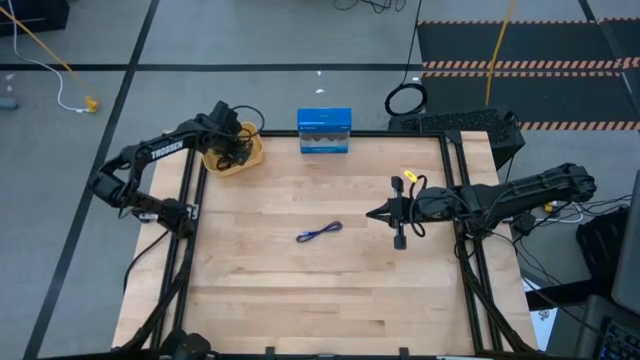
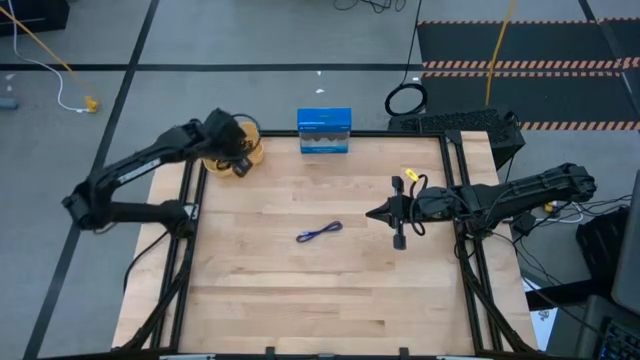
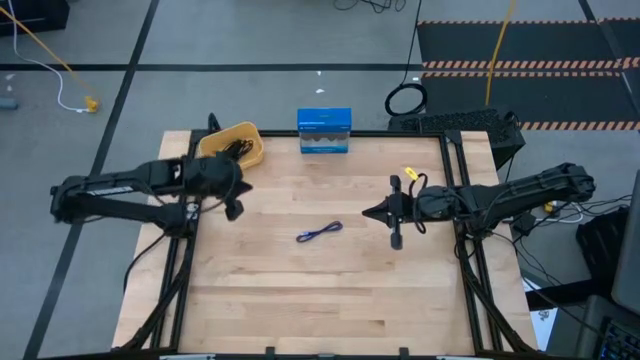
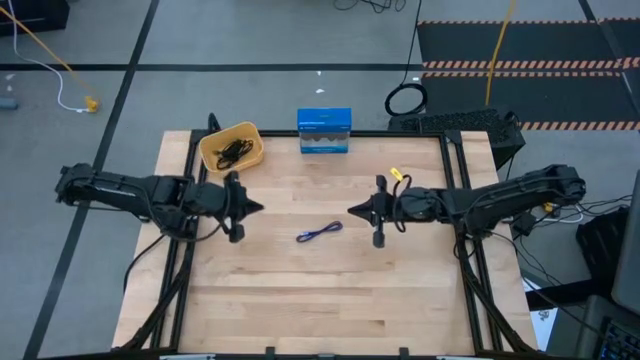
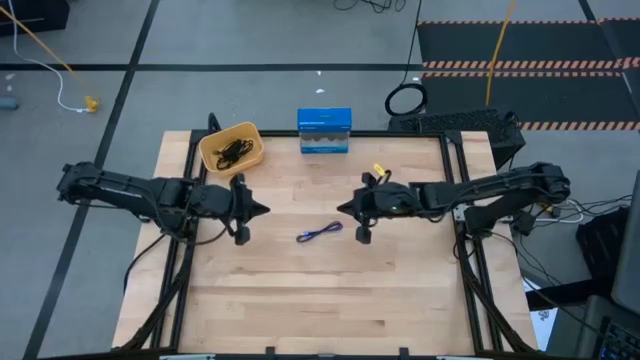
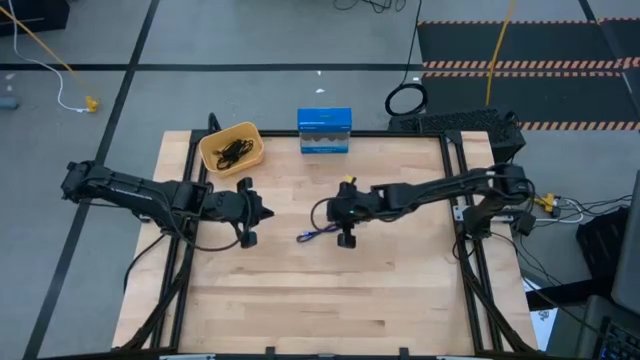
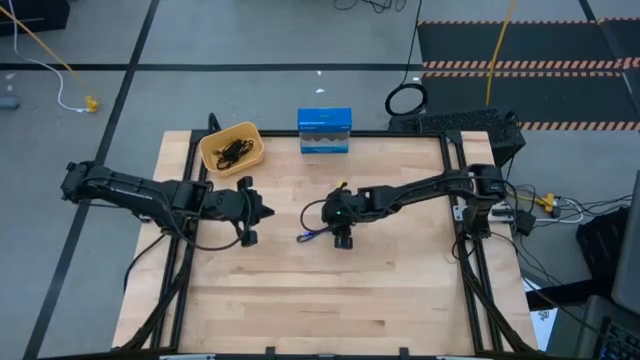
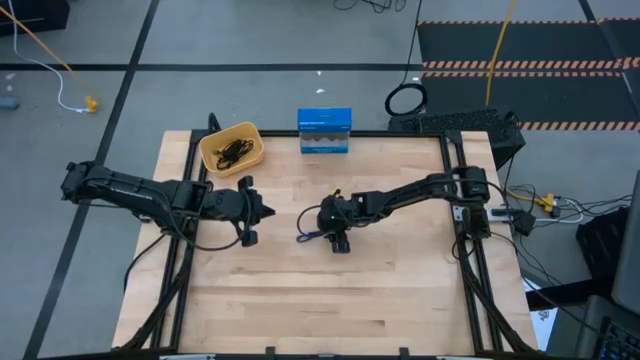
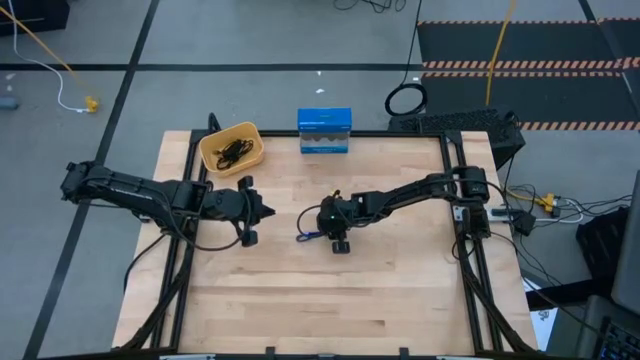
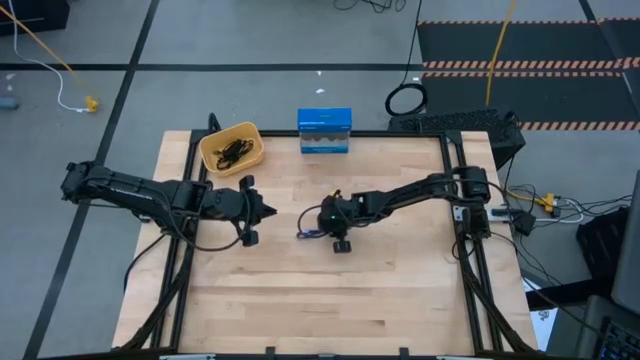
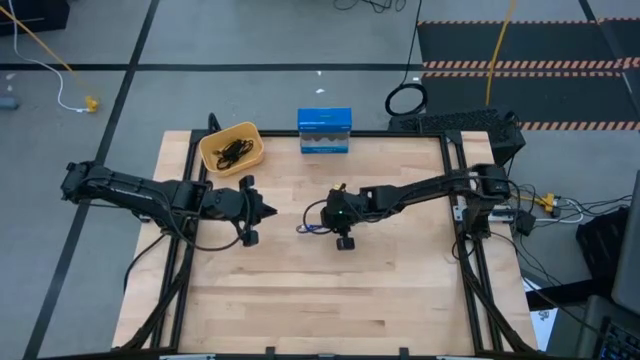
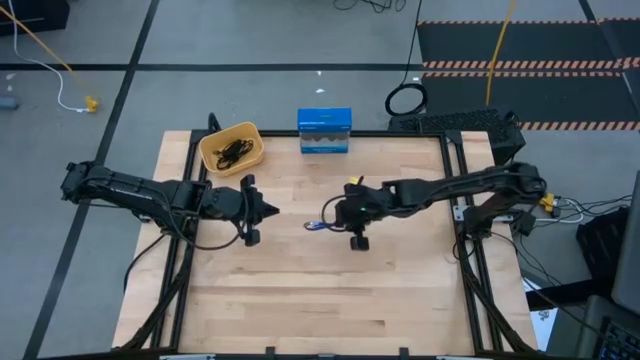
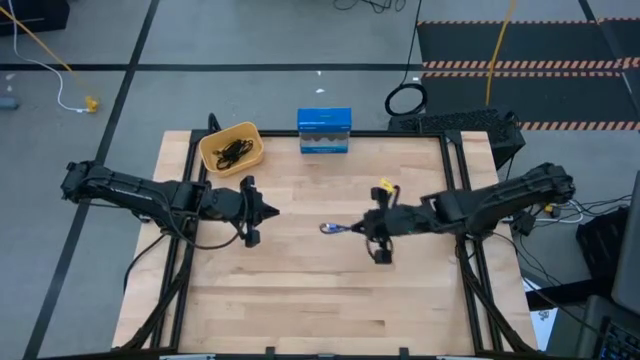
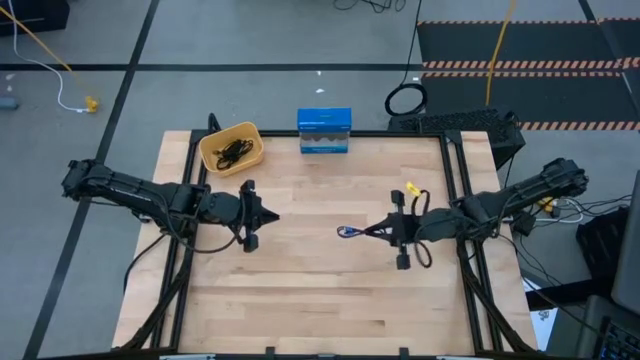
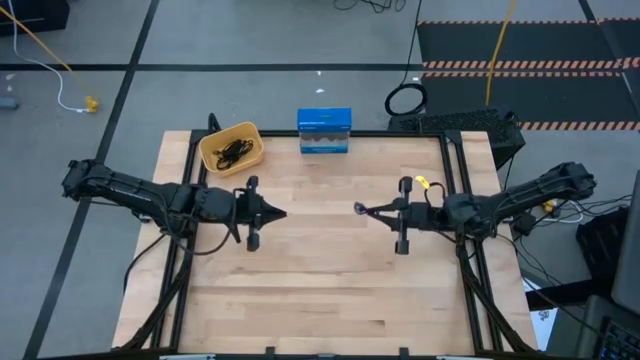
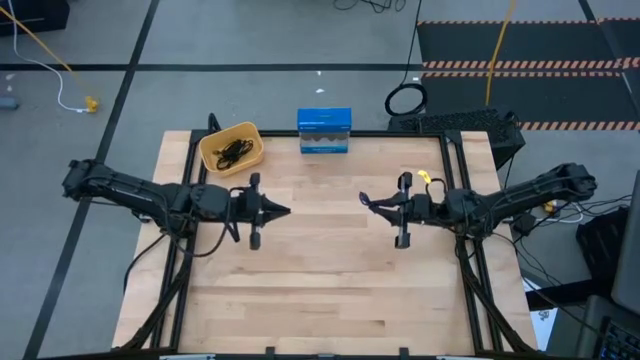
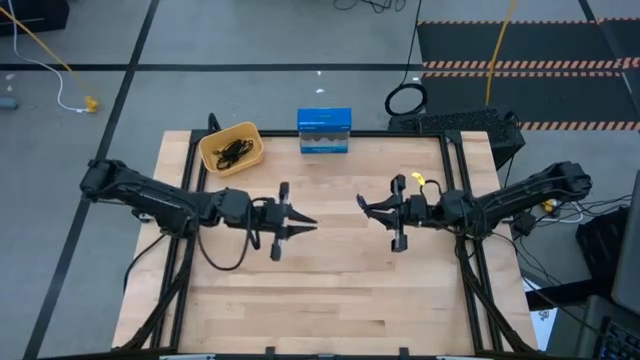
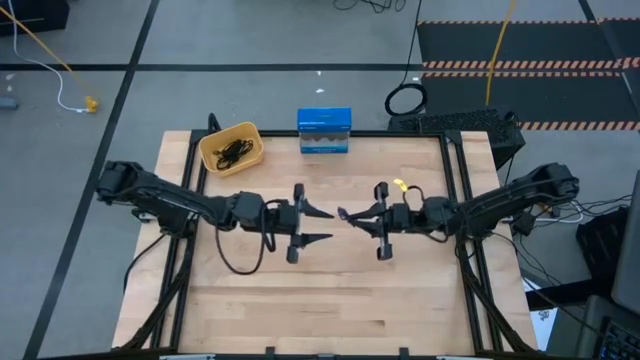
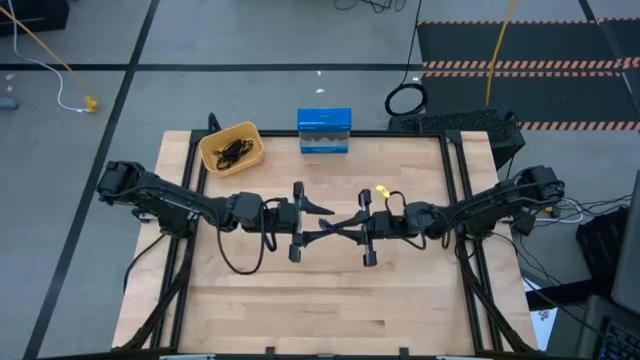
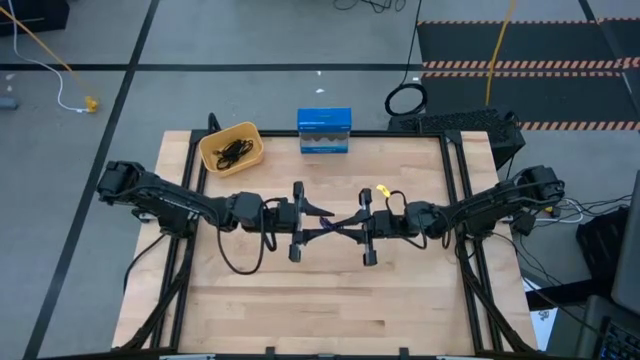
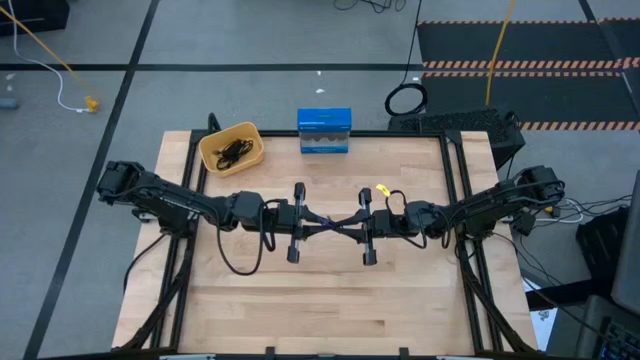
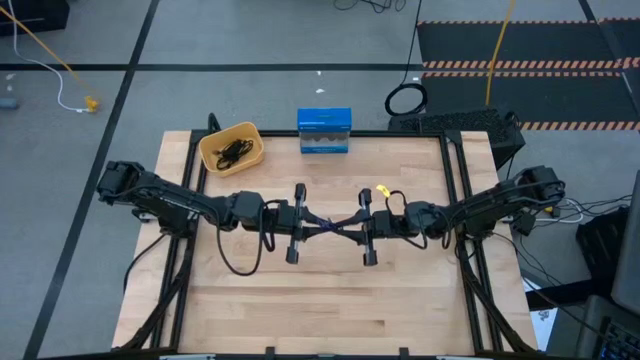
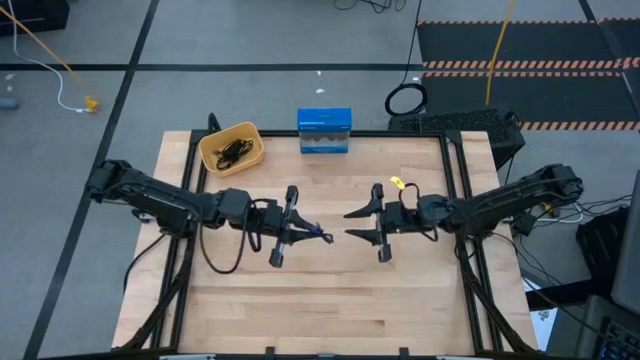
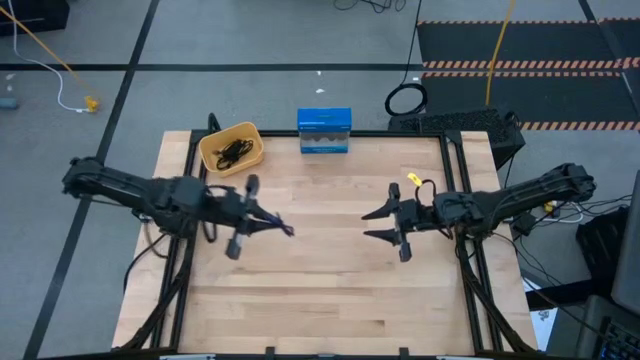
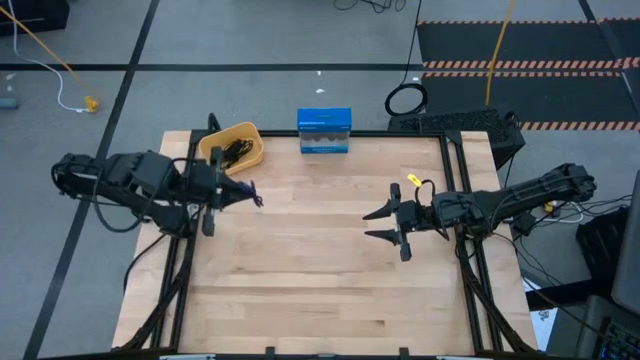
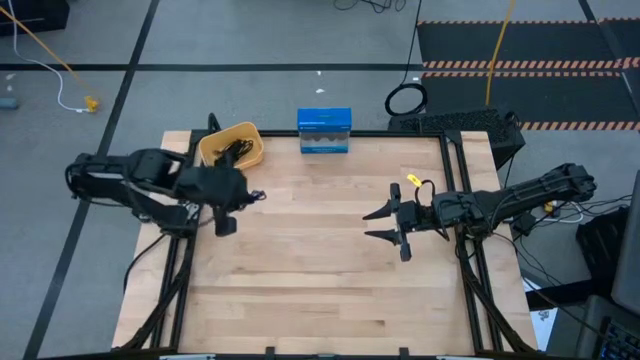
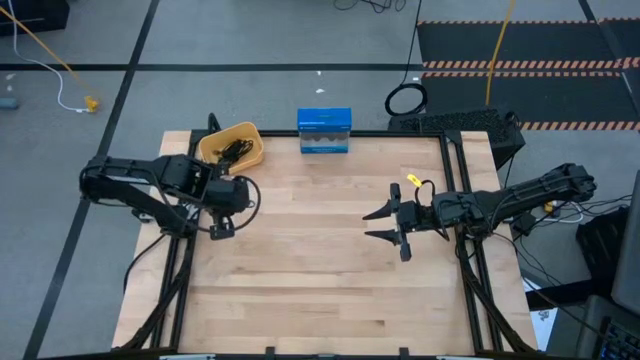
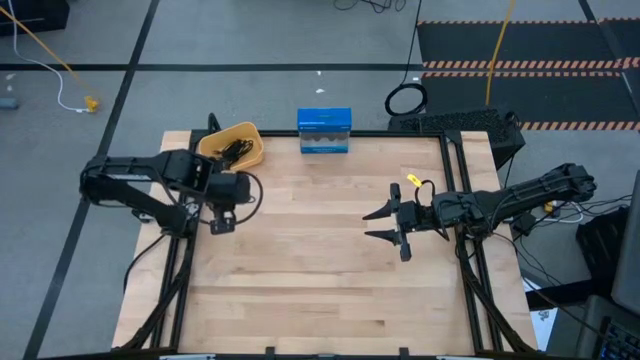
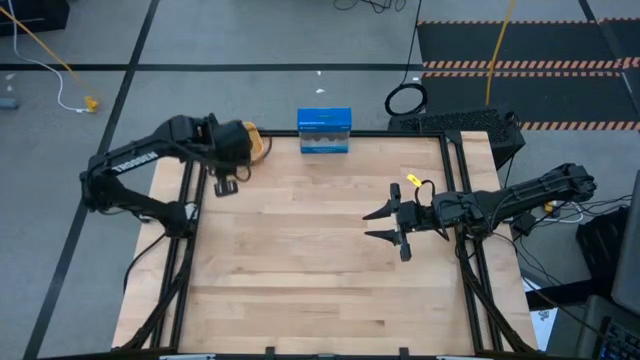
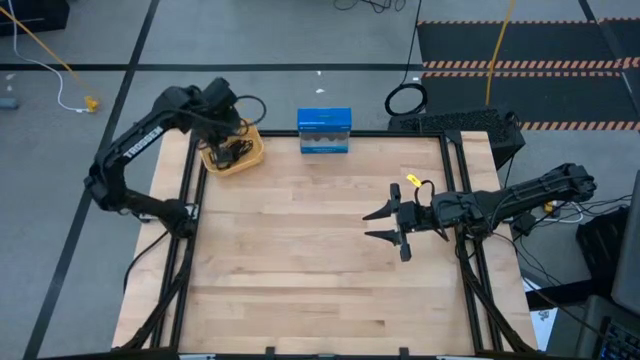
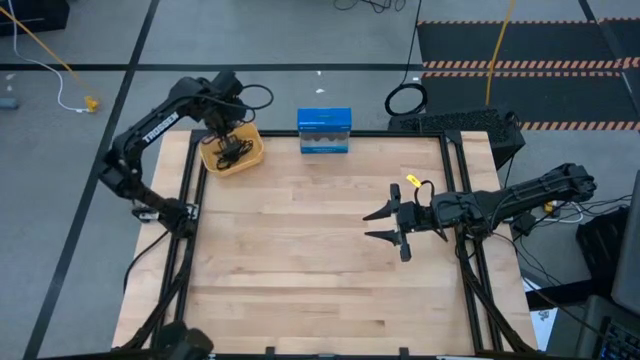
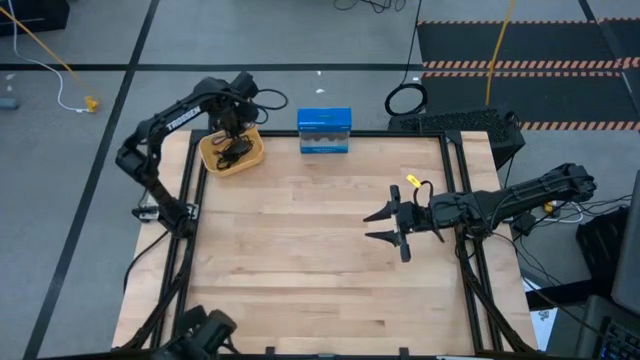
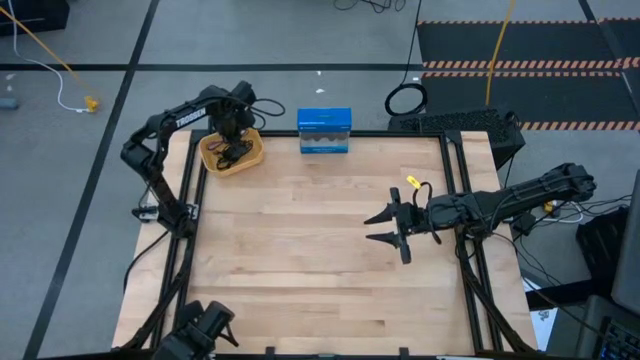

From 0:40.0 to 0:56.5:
Task: Pick and place USB-C Cables
Put the blue charger cable into the yellow bin
